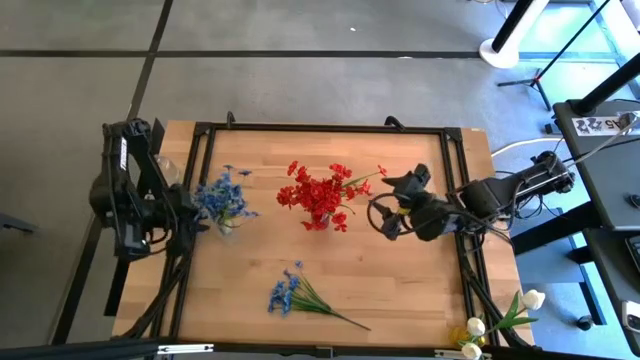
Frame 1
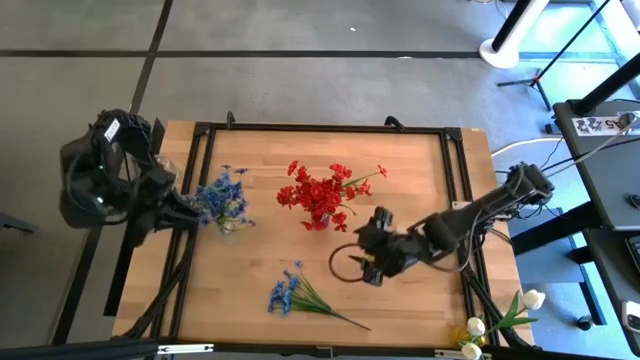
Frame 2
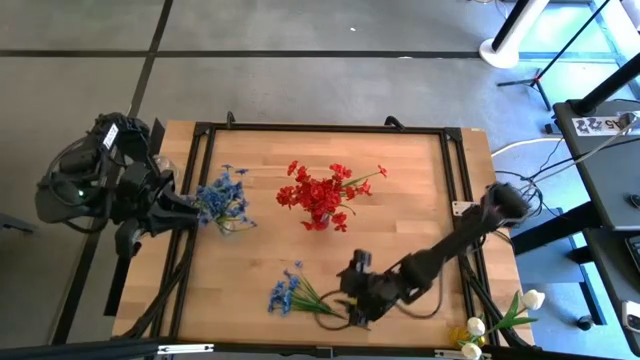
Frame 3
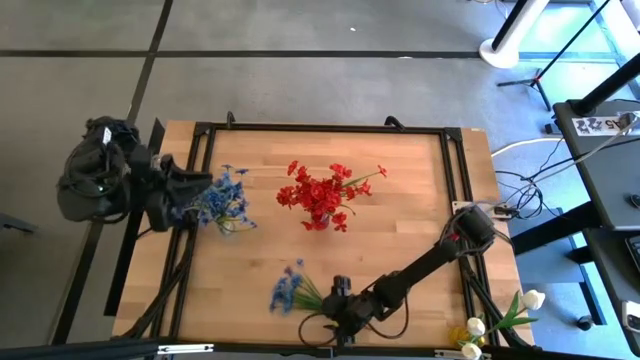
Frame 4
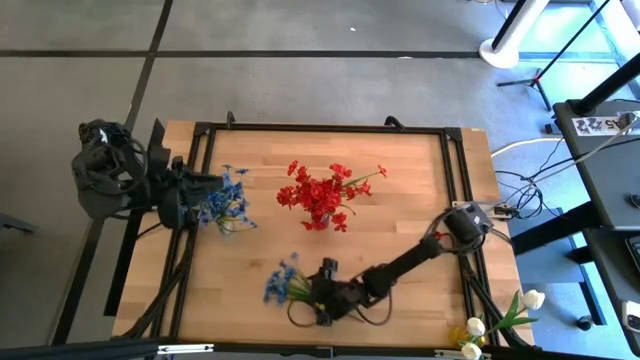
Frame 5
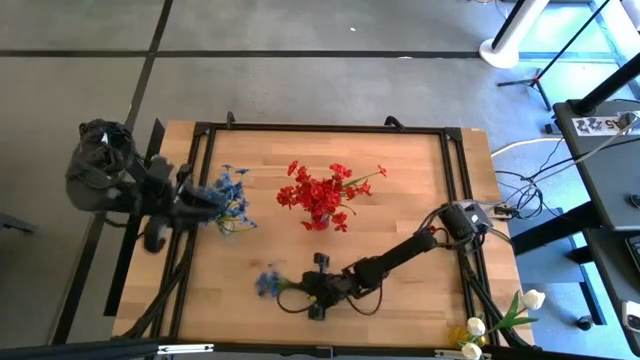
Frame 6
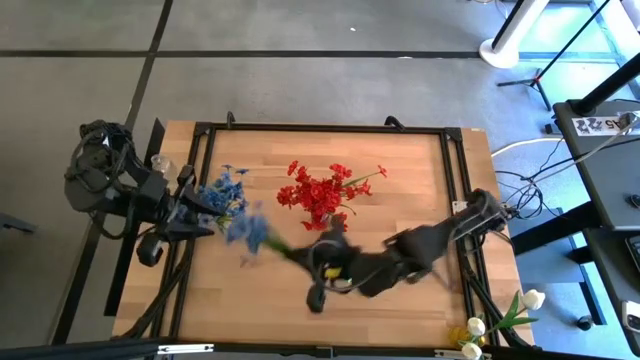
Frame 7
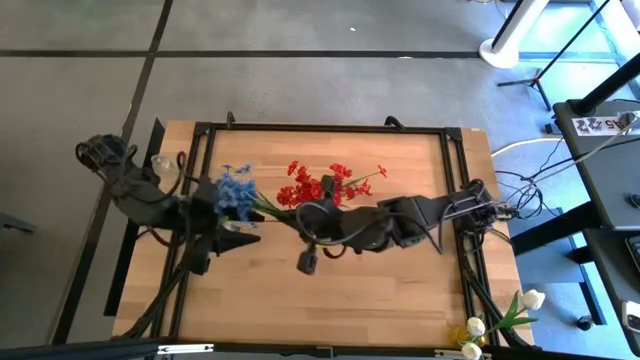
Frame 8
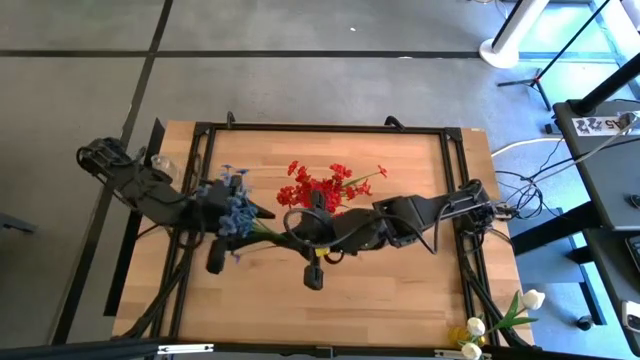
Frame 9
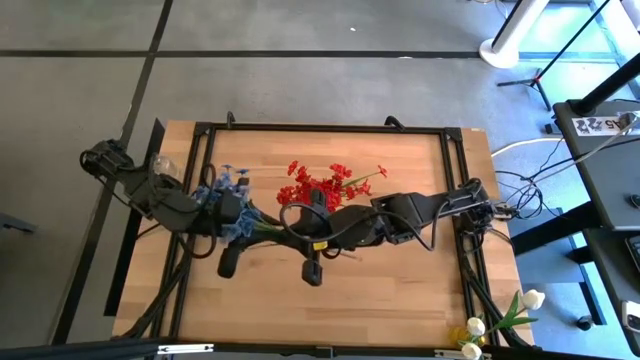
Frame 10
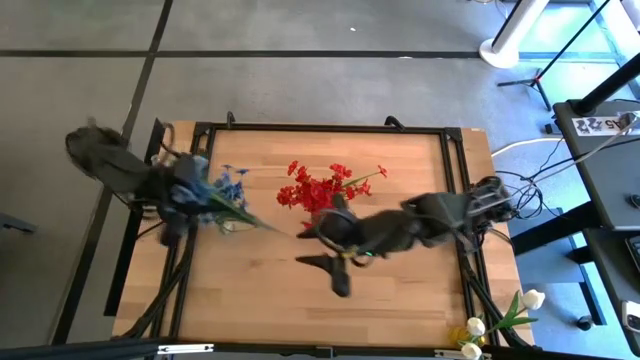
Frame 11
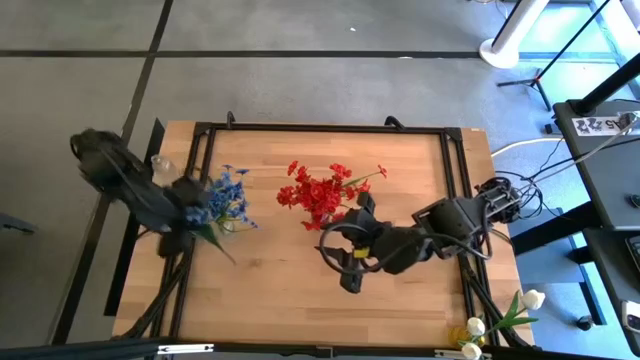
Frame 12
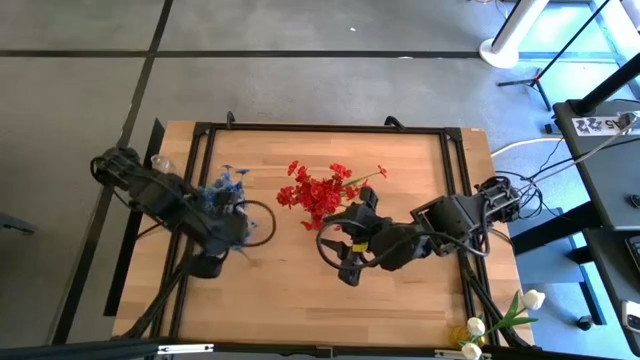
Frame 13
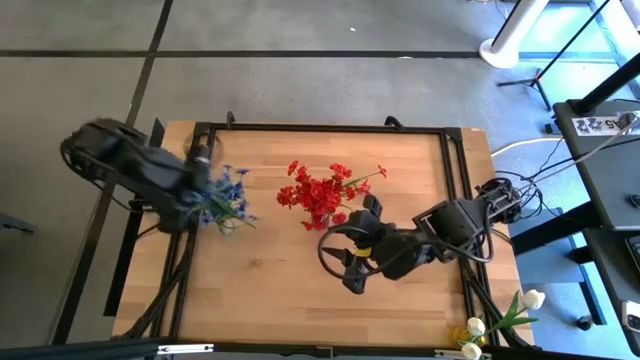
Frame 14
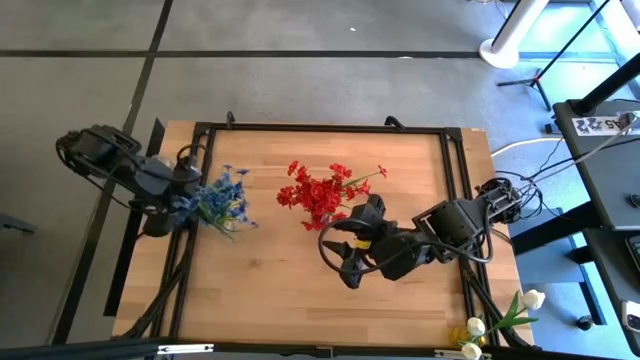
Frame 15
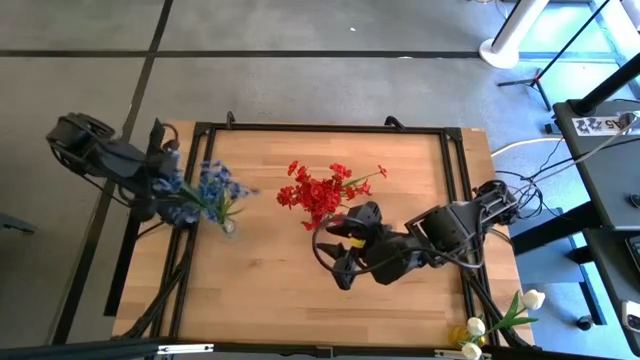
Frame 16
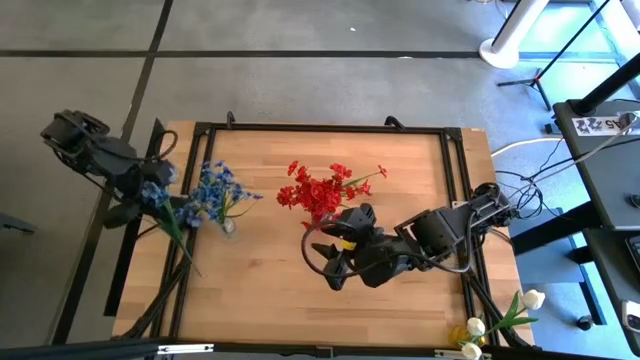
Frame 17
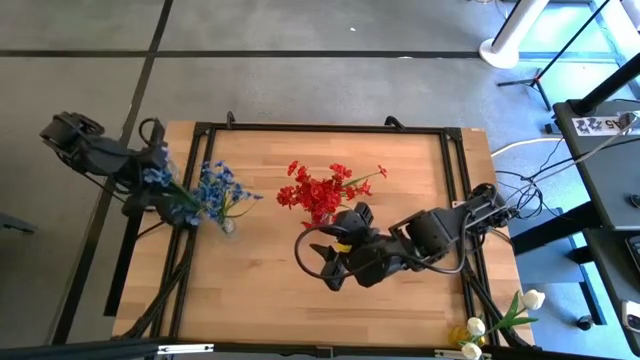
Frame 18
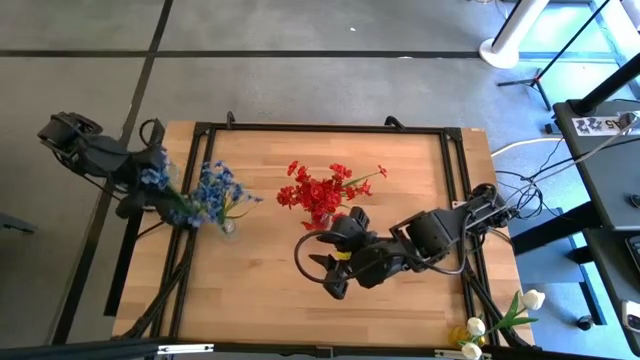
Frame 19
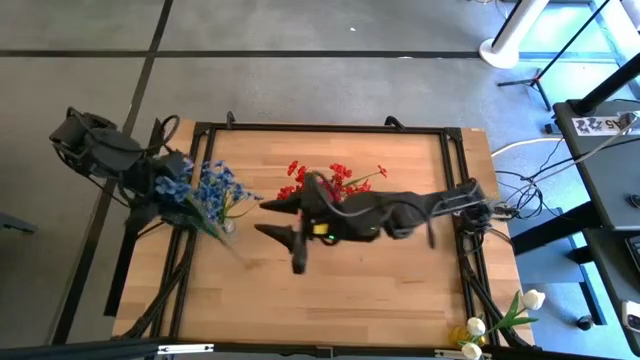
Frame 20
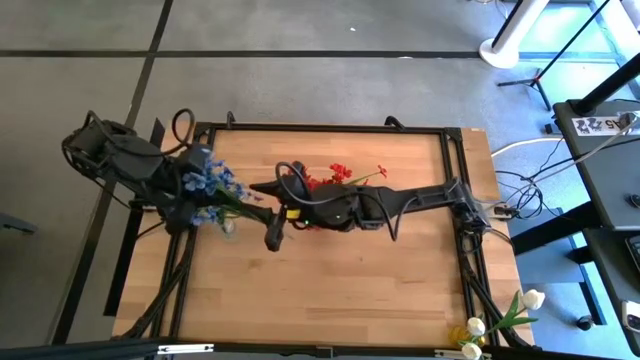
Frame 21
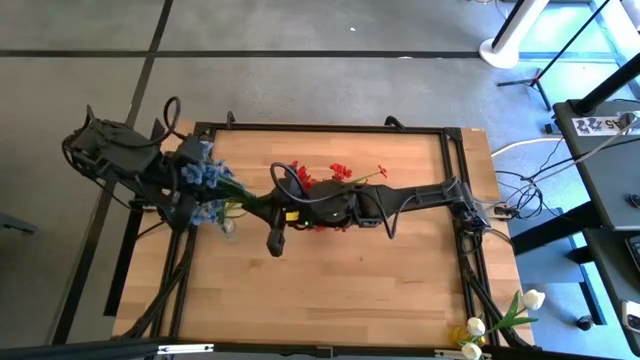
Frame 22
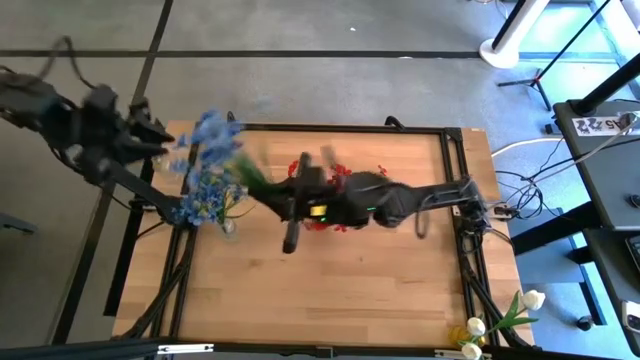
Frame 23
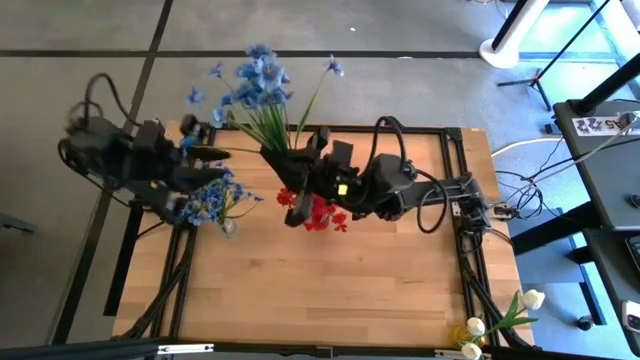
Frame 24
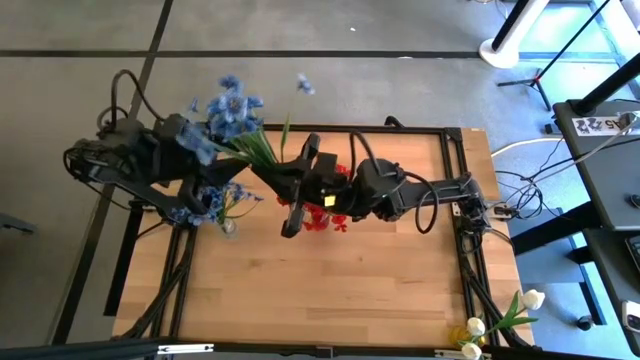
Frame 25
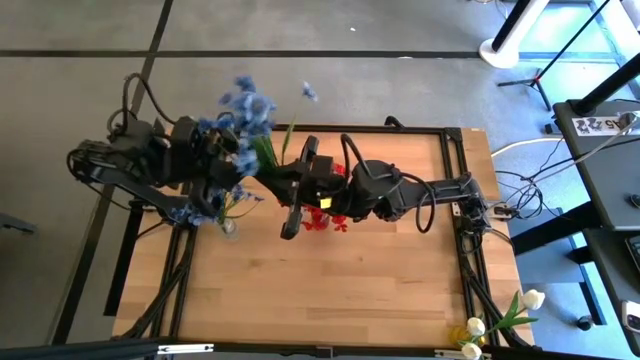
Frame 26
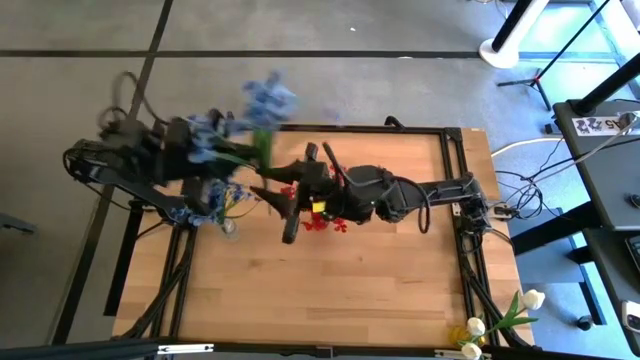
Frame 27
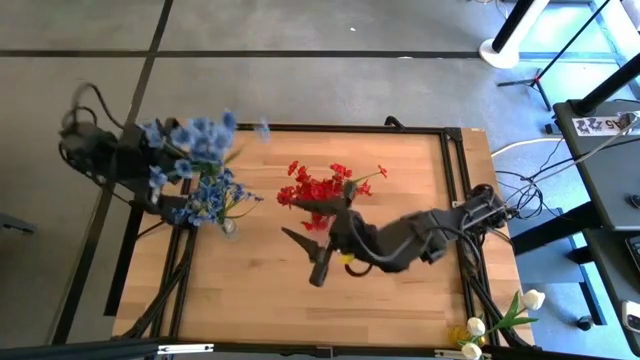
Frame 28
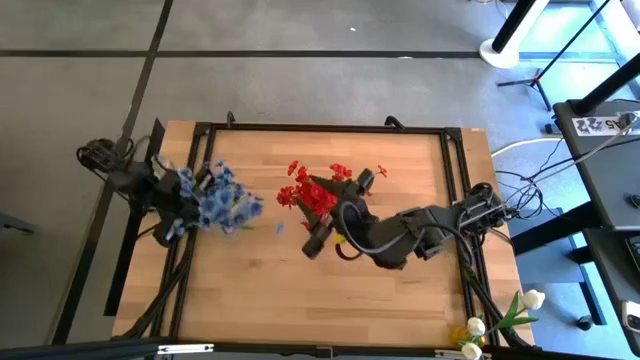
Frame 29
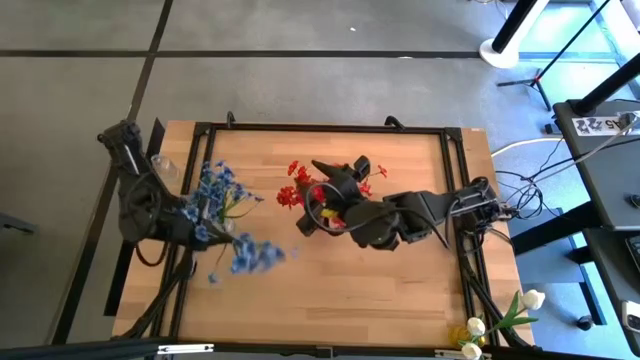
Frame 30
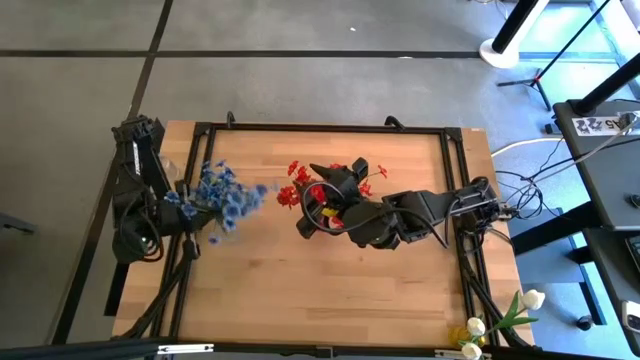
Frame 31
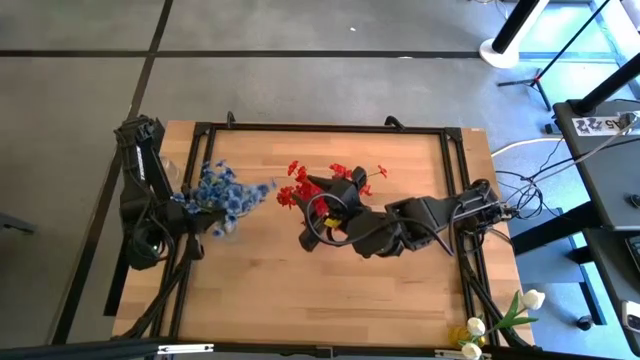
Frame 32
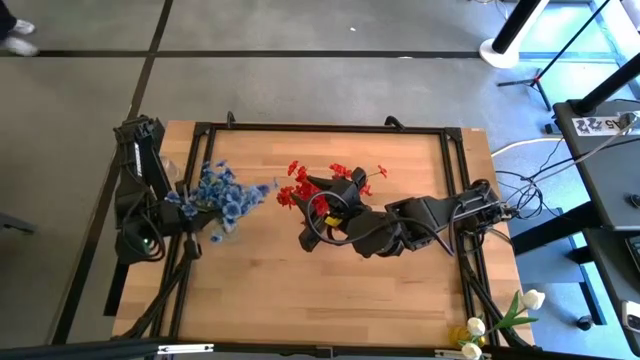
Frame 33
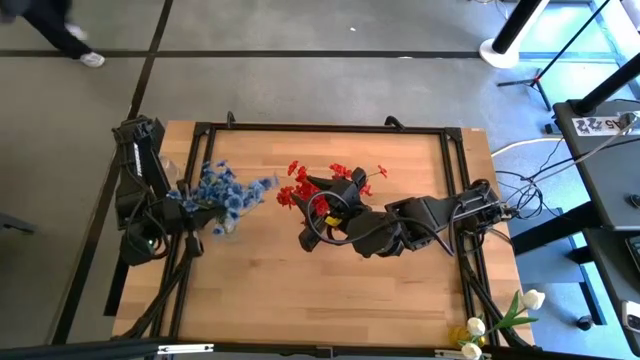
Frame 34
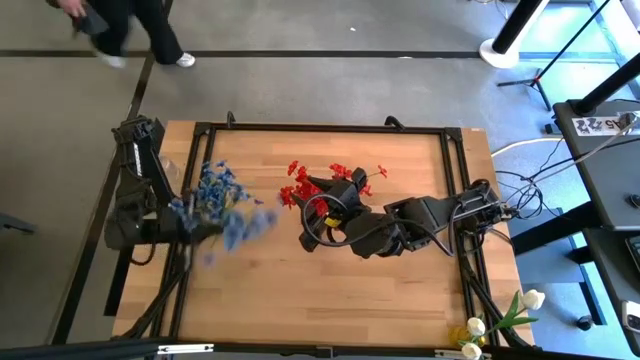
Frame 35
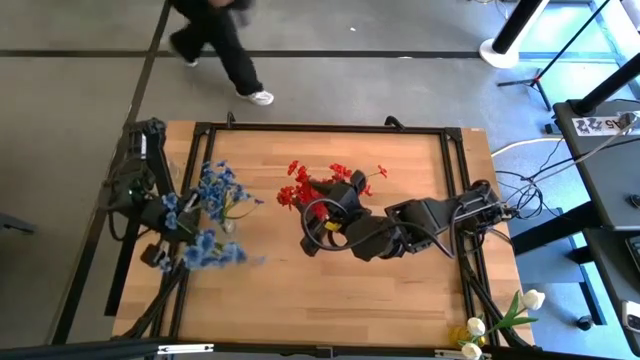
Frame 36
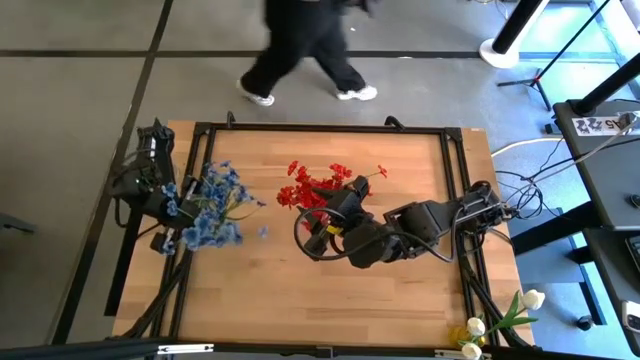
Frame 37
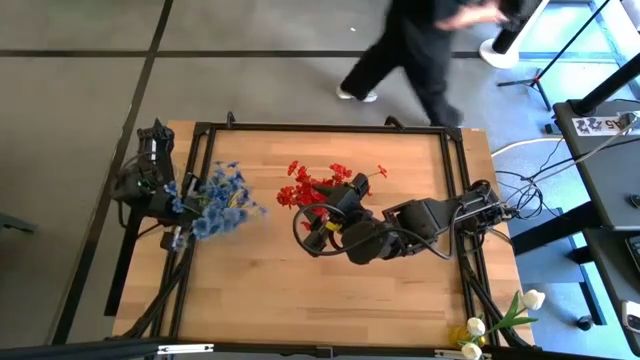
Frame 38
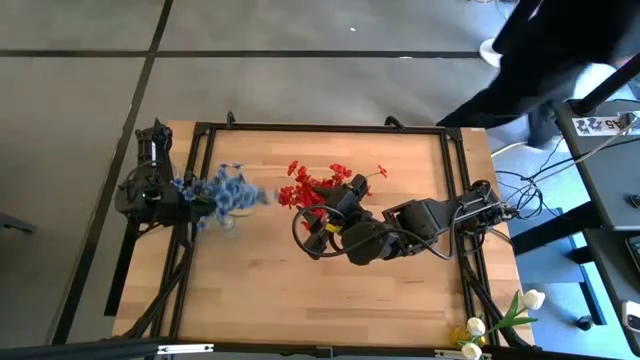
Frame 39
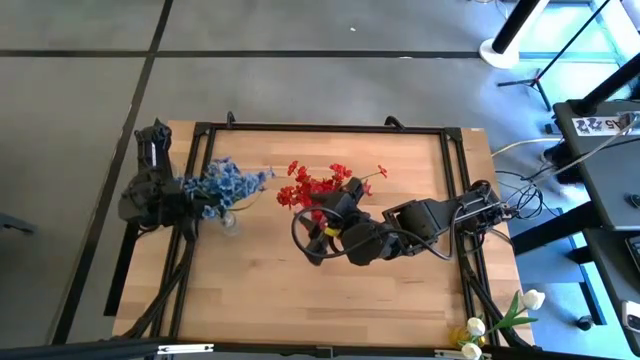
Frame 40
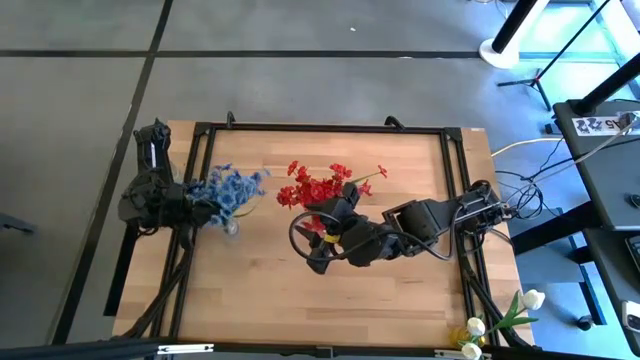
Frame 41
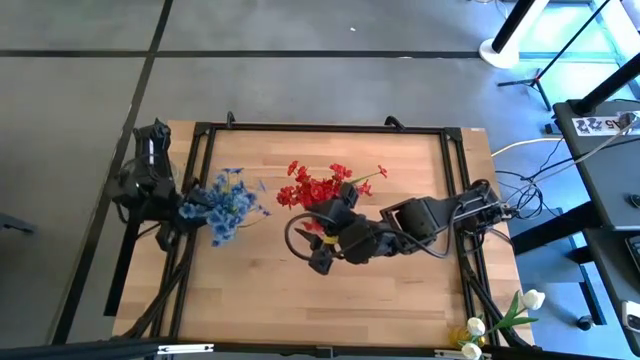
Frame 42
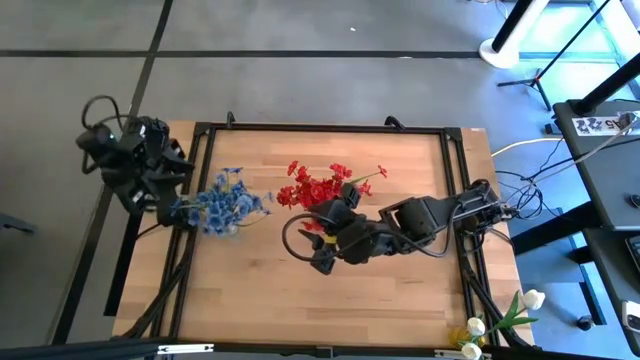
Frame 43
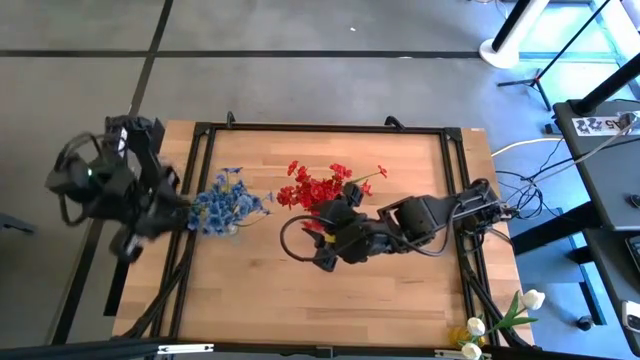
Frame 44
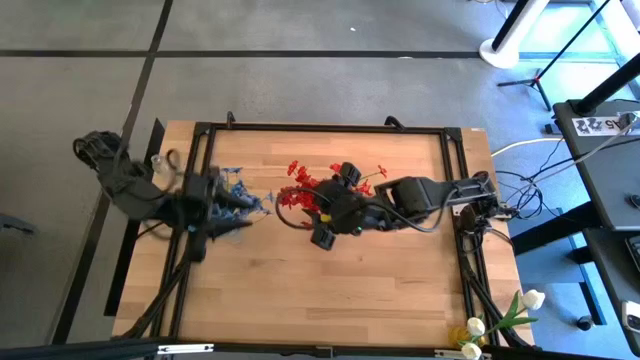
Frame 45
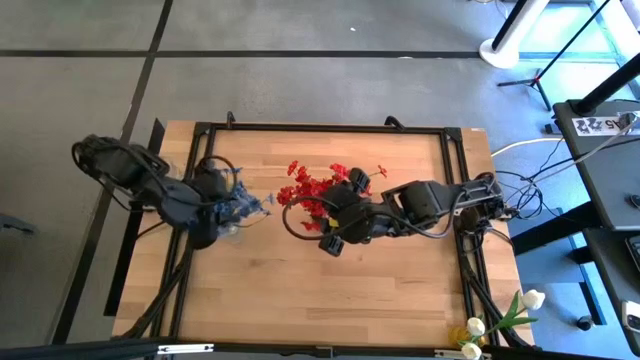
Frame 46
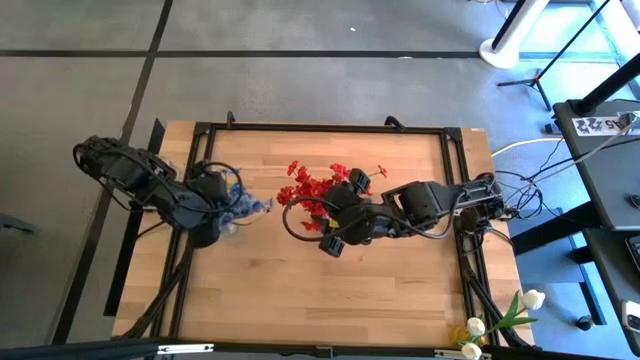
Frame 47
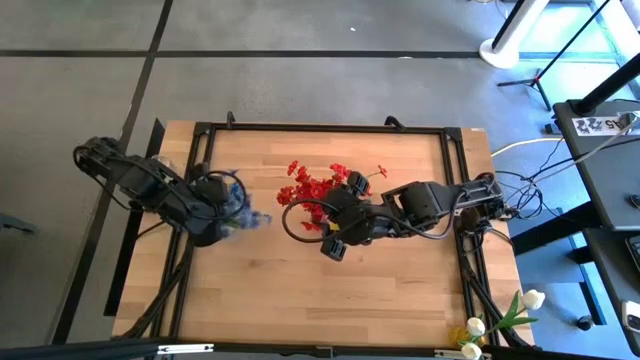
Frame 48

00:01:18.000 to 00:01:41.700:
Task: Sort flowers into vase by color
Put the blue flowers into the transparent vase
